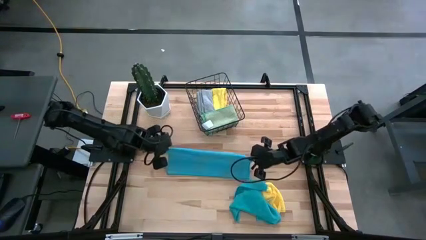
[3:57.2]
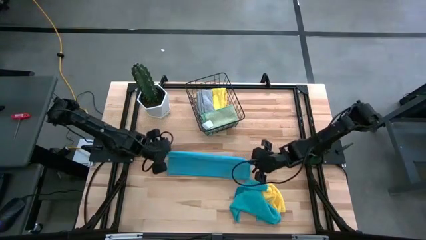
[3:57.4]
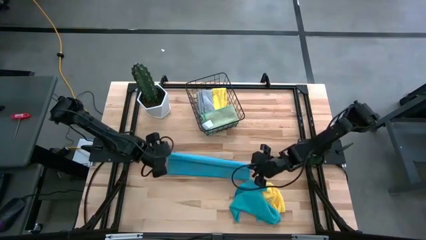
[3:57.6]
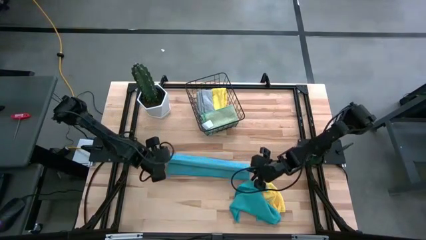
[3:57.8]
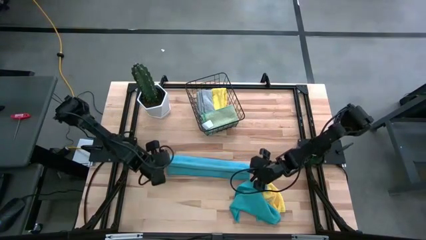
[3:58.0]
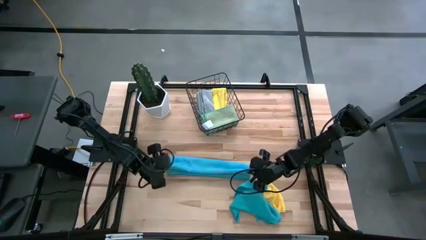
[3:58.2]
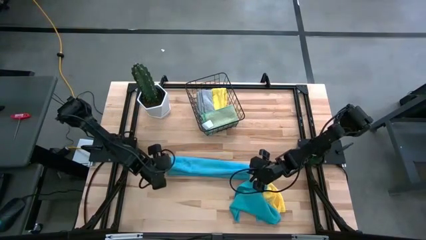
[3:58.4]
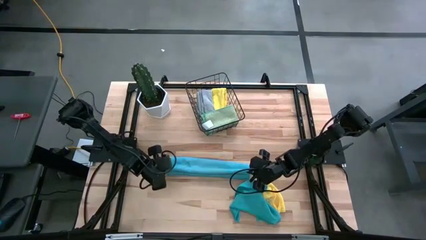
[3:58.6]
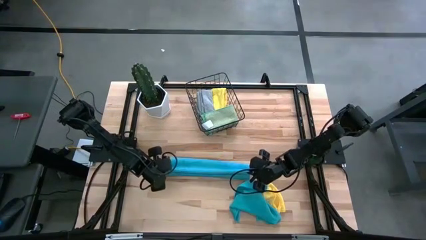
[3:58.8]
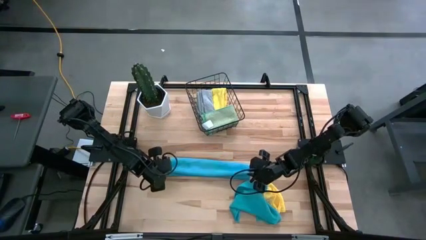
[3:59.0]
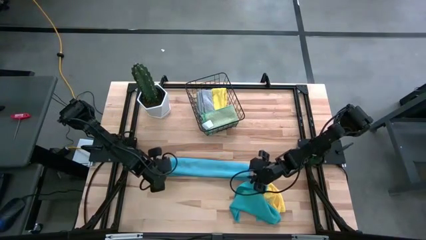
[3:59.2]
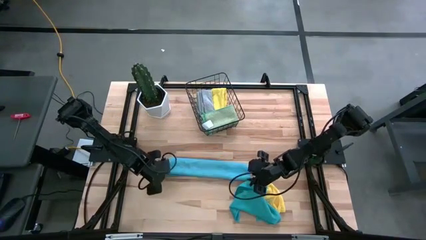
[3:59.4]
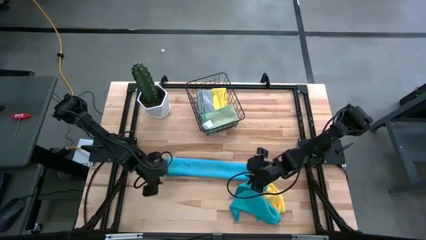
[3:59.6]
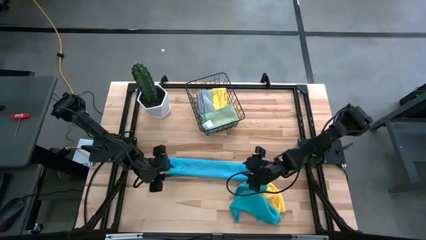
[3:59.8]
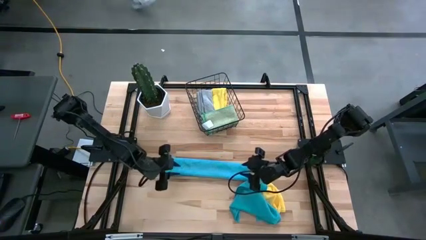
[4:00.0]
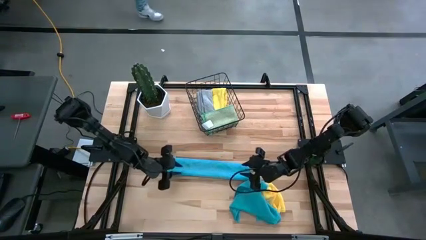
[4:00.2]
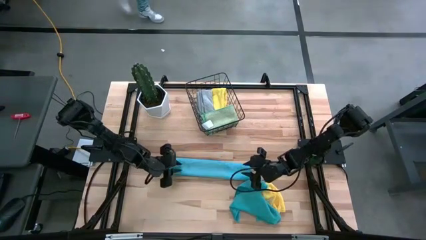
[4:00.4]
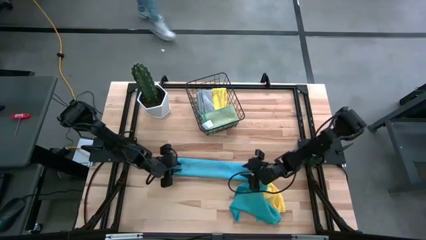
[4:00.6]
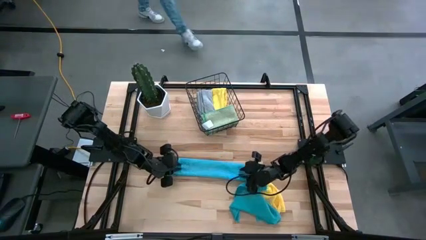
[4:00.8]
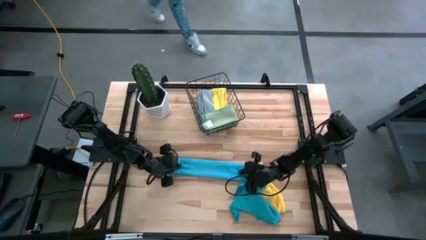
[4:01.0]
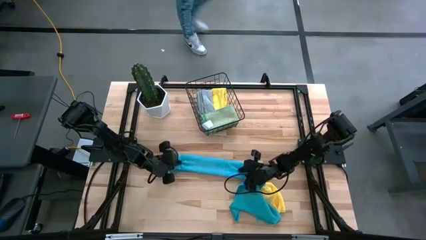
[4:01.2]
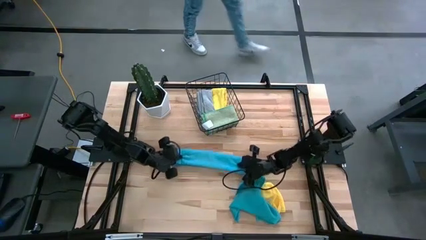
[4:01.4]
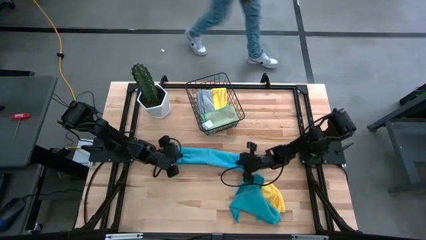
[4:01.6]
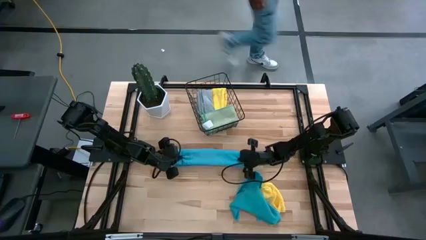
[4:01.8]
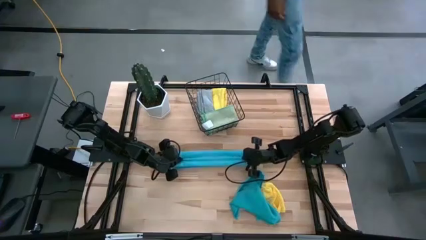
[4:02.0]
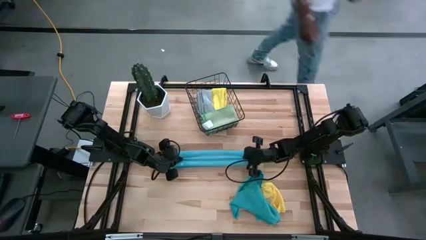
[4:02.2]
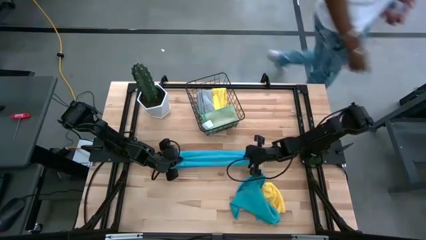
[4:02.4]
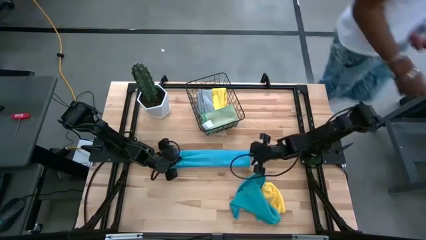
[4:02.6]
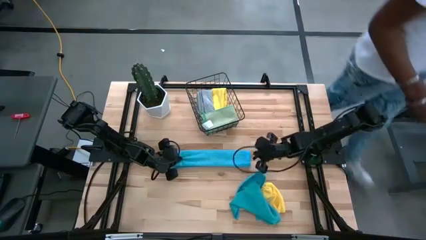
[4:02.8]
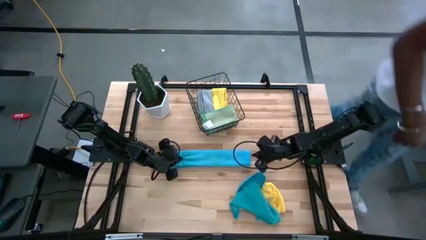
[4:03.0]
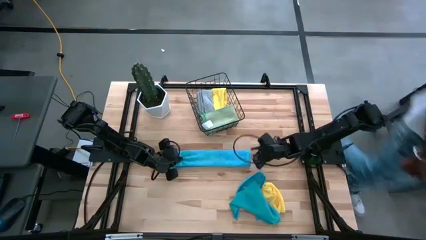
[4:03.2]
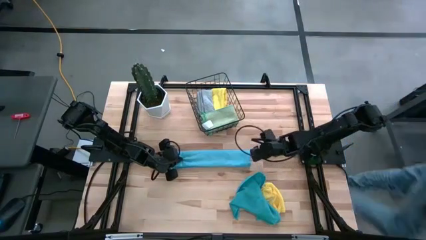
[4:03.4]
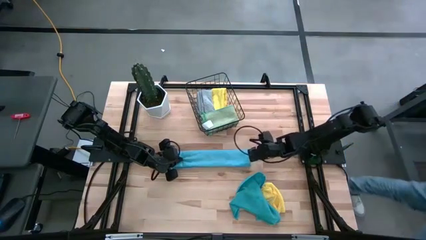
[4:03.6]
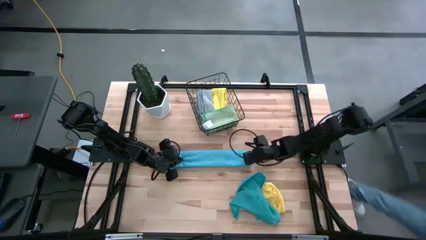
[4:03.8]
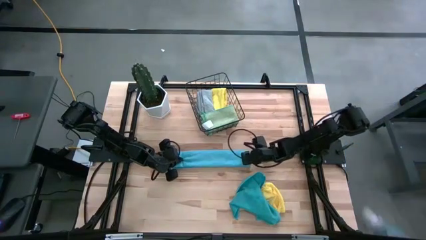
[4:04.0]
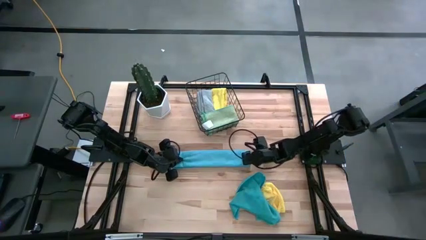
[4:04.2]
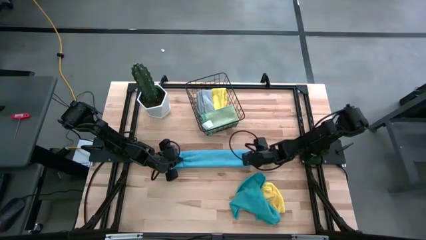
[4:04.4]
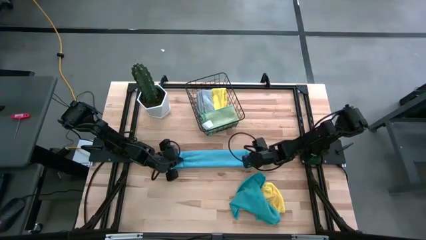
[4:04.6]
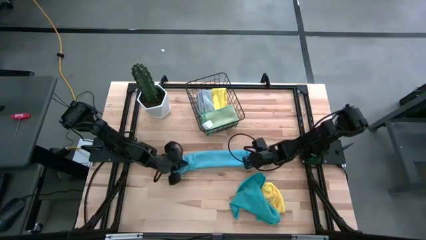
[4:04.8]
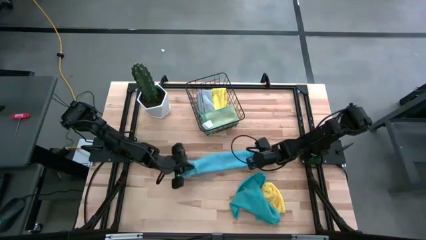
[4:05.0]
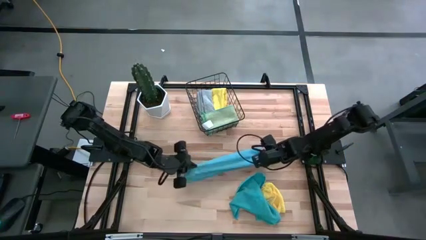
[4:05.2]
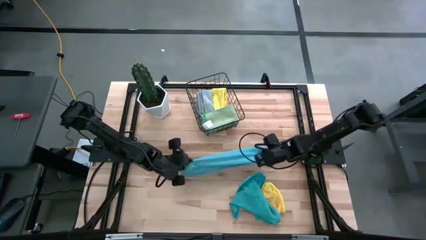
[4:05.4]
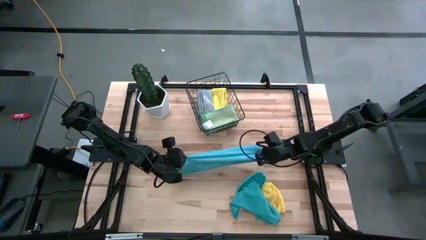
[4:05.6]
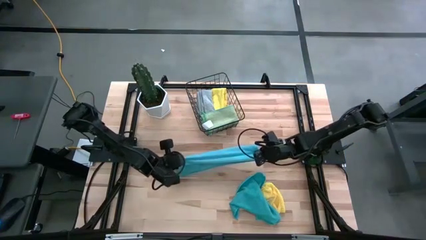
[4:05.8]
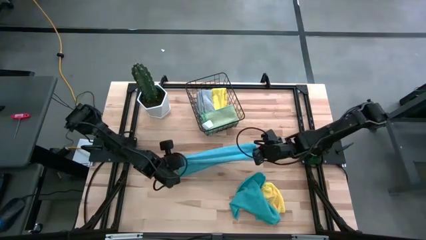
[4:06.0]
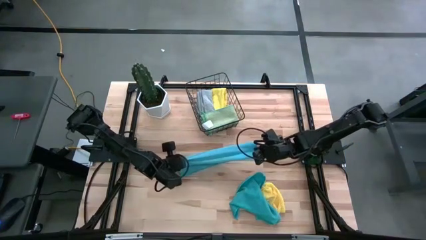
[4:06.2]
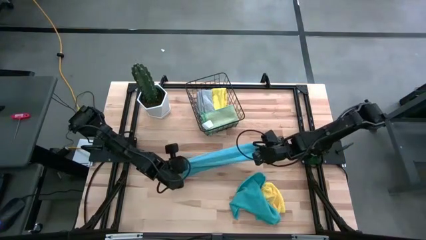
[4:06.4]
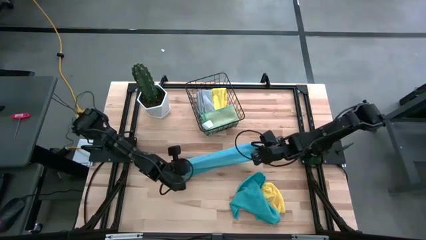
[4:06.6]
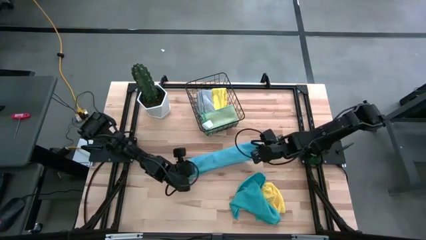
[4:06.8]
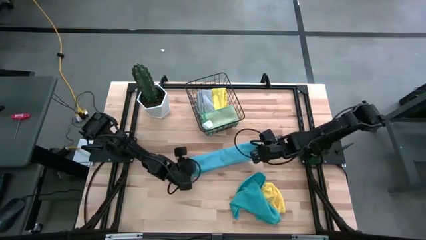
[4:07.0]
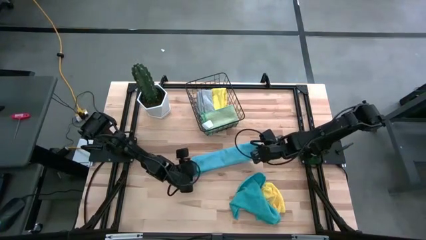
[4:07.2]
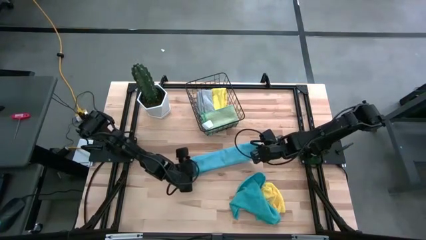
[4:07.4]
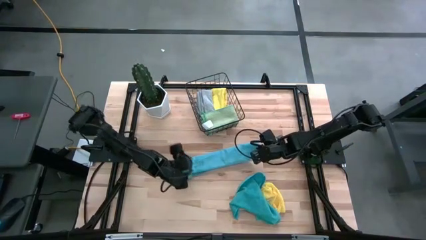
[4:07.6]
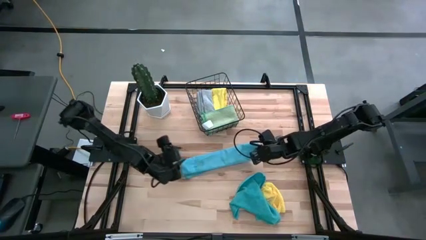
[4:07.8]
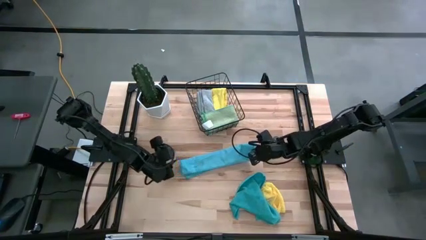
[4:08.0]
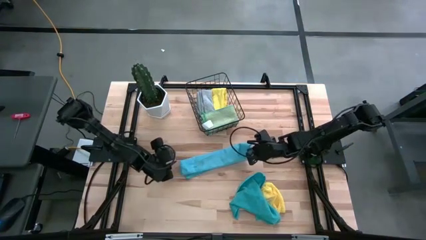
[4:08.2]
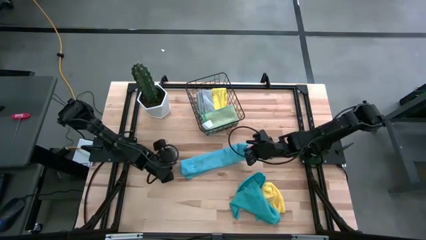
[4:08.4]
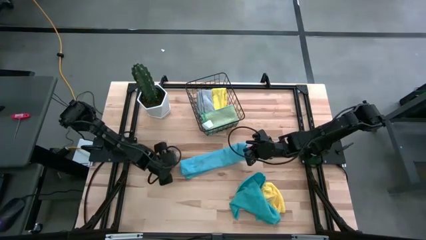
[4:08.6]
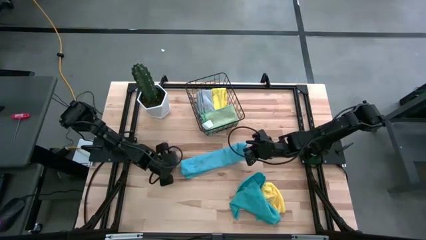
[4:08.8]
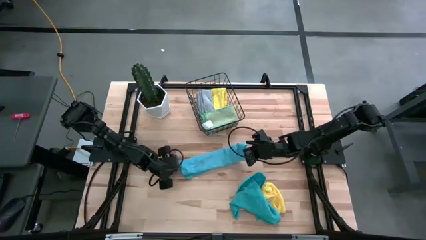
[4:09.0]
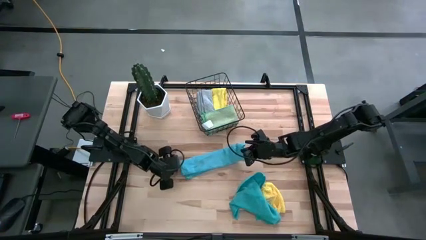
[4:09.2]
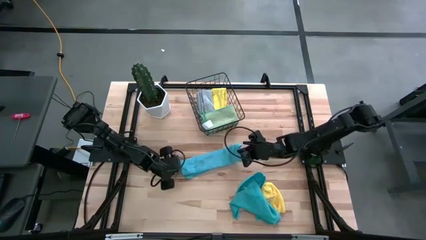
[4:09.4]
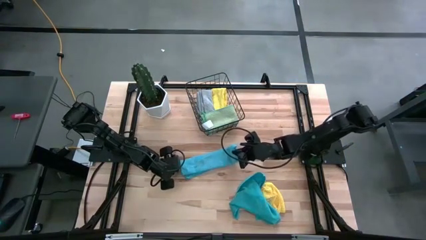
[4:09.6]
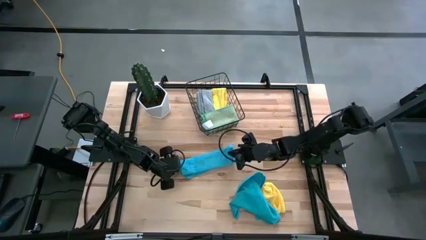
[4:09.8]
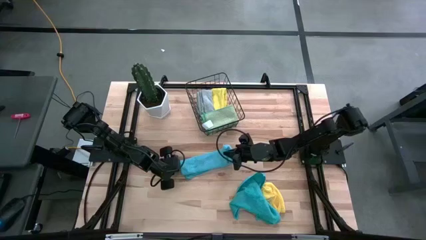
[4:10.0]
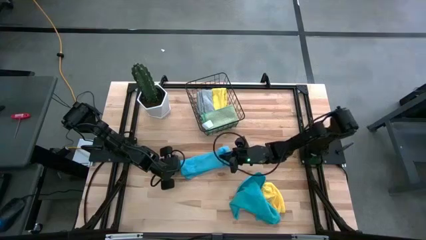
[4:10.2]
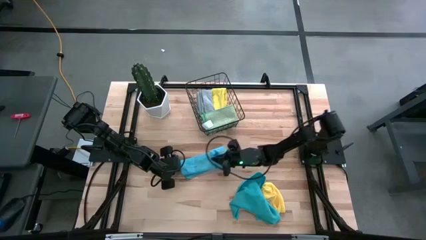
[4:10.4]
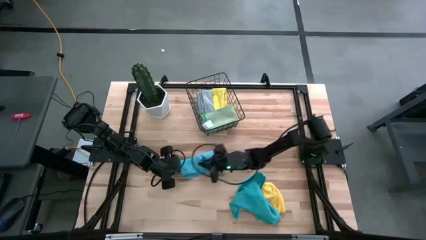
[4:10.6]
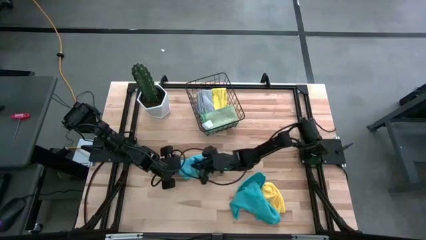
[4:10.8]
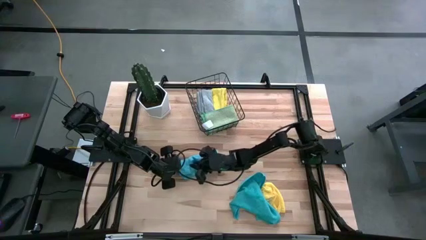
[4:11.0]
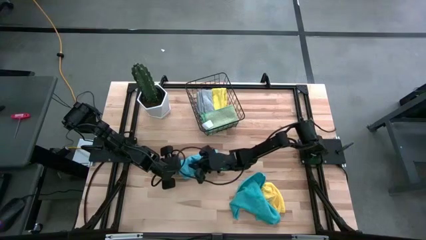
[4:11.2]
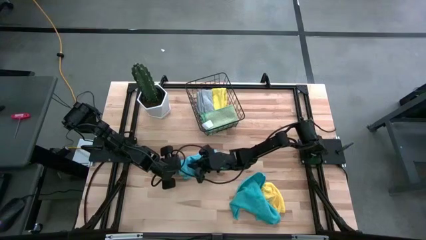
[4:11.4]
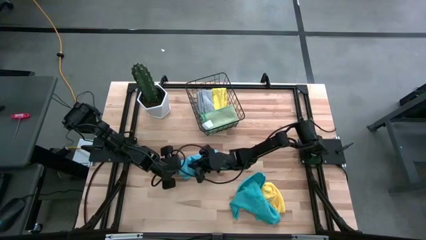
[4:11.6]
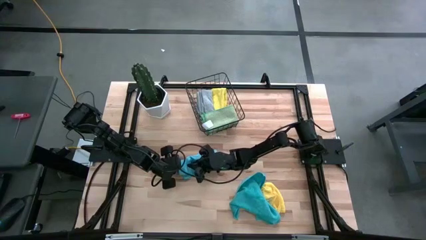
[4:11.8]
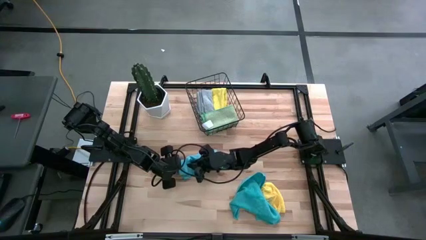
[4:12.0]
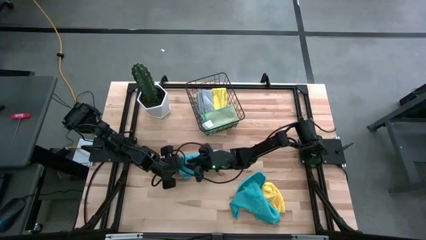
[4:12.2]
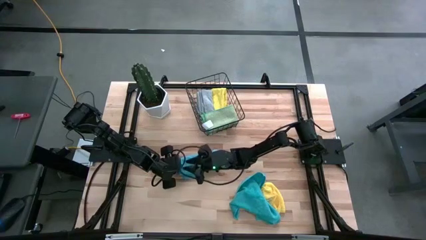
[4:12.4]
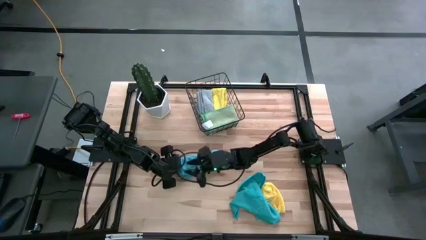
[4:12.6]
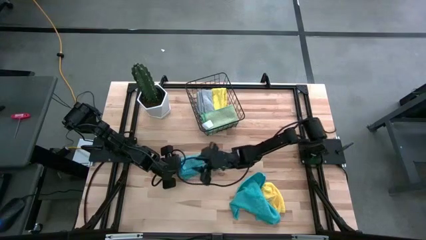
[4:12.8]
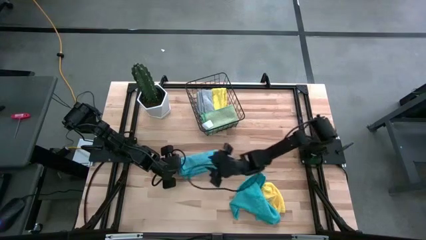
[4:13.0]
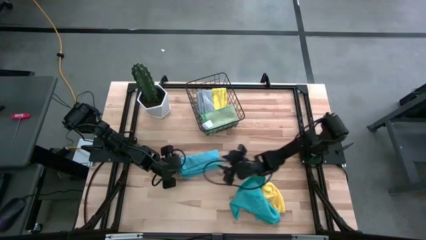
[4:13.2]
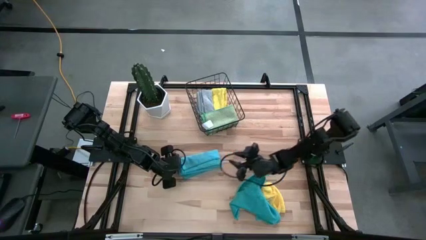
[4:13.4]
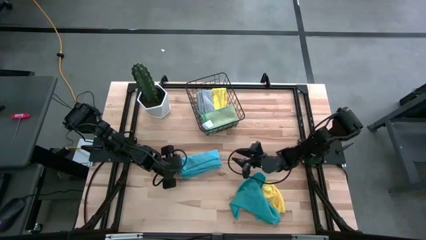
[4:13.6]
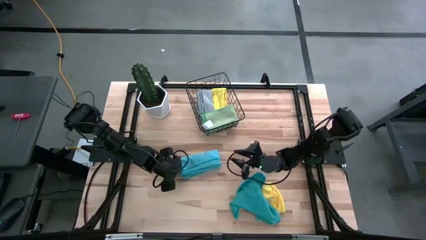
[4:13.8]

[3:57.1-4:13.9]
Task: Fold microfiber towels
Fold the left blue microfiber cloth
